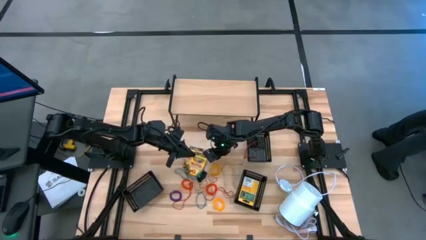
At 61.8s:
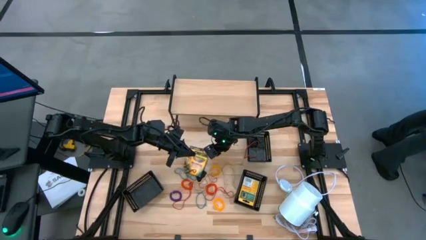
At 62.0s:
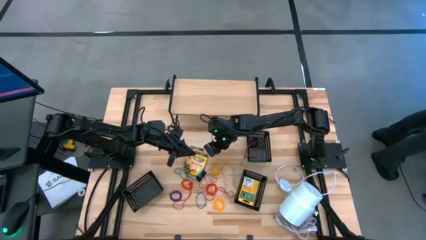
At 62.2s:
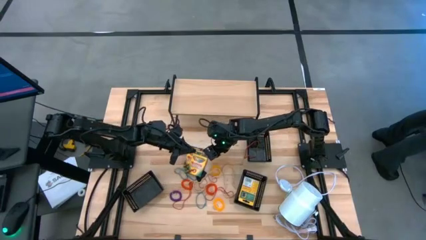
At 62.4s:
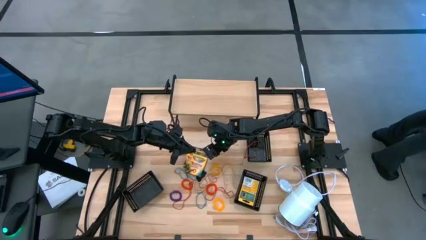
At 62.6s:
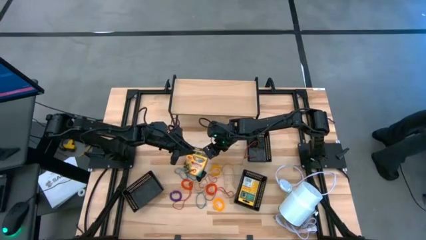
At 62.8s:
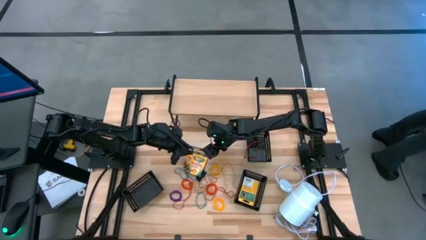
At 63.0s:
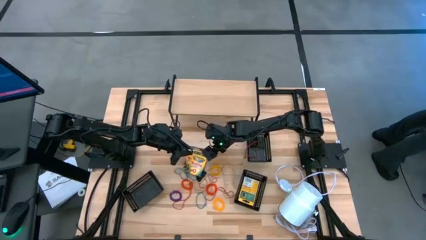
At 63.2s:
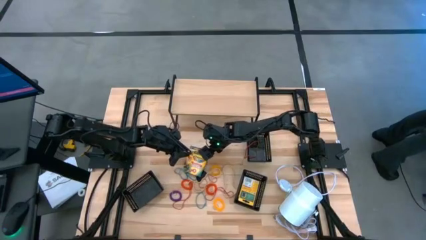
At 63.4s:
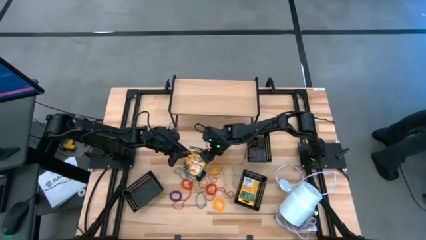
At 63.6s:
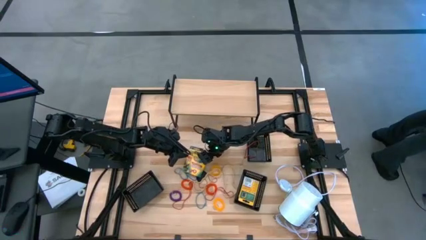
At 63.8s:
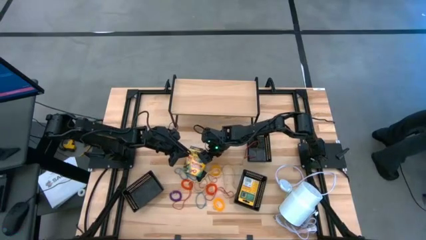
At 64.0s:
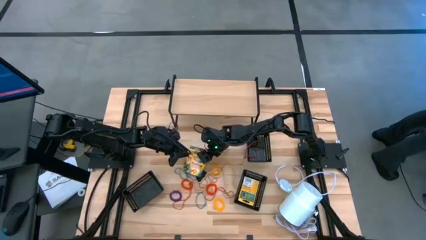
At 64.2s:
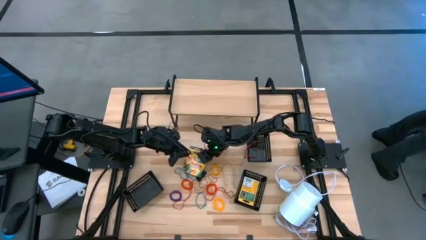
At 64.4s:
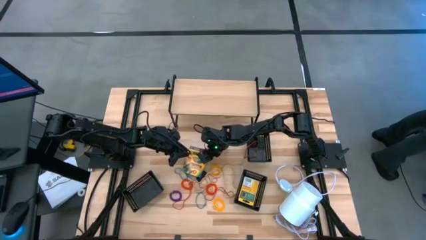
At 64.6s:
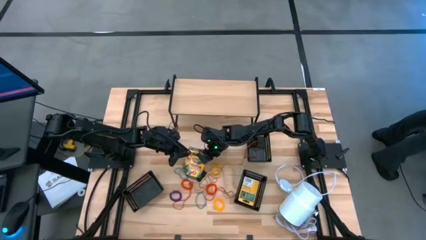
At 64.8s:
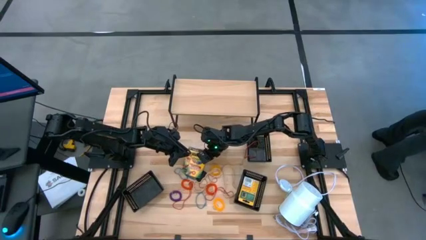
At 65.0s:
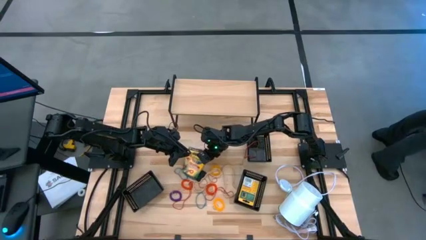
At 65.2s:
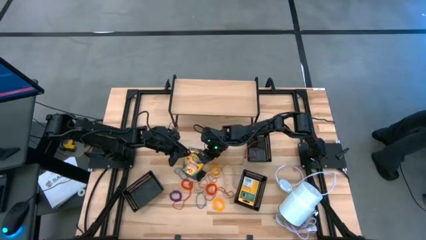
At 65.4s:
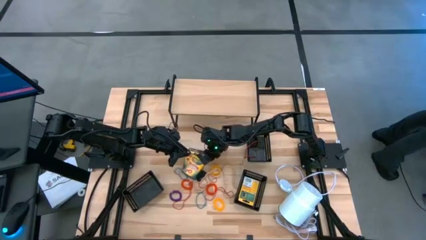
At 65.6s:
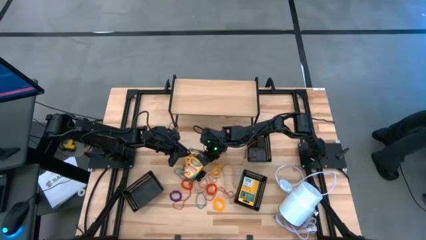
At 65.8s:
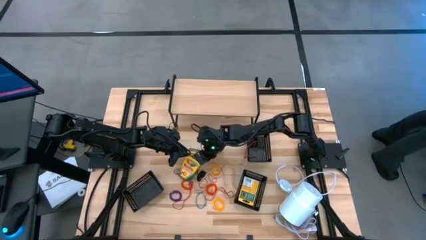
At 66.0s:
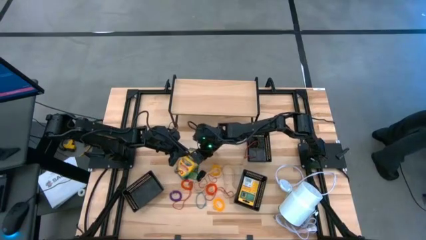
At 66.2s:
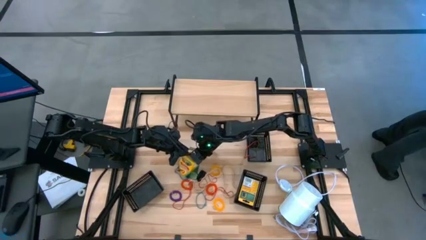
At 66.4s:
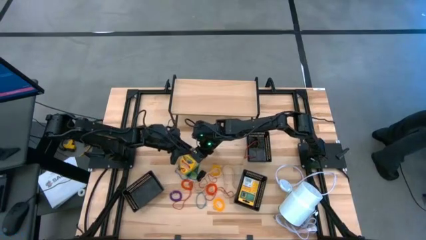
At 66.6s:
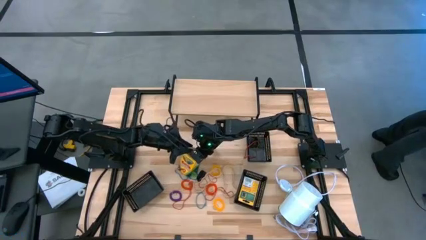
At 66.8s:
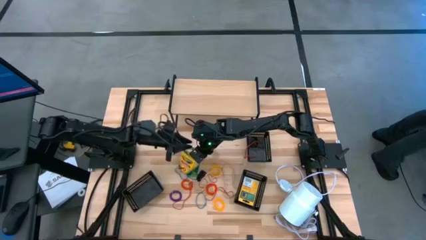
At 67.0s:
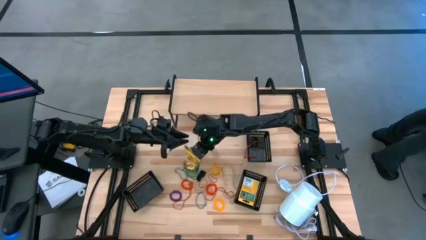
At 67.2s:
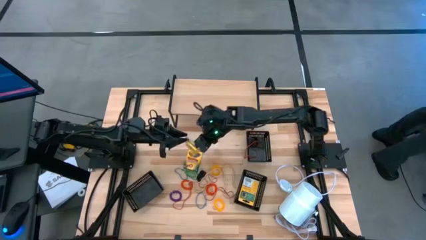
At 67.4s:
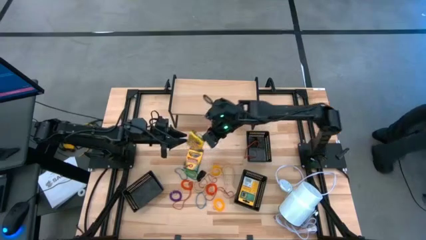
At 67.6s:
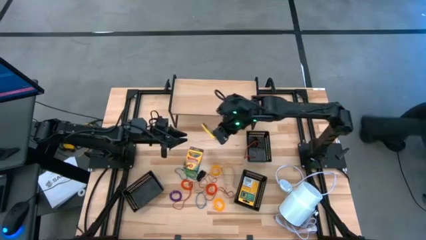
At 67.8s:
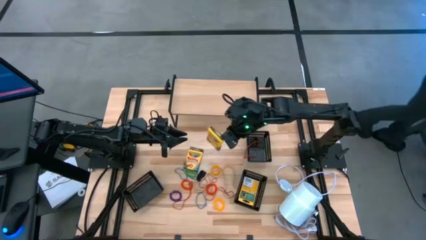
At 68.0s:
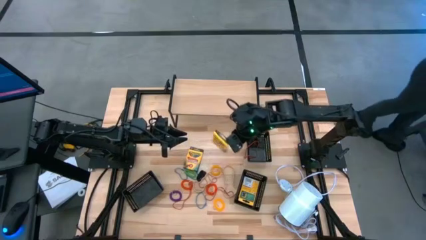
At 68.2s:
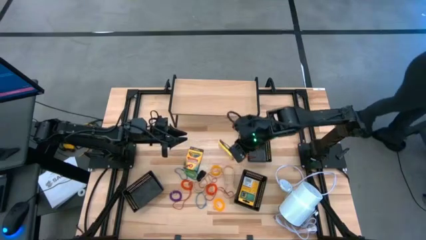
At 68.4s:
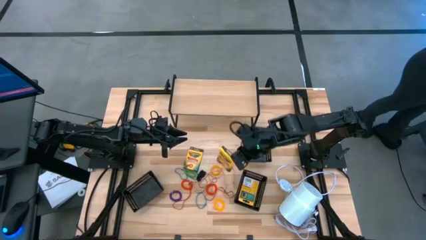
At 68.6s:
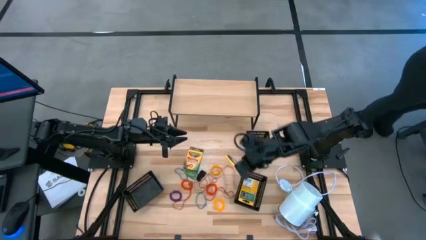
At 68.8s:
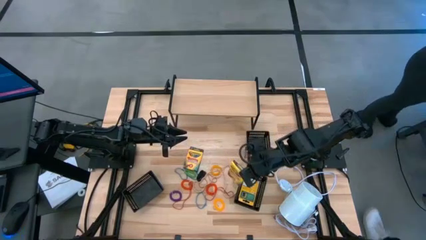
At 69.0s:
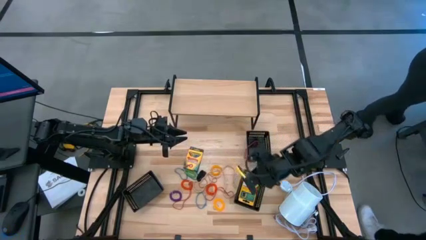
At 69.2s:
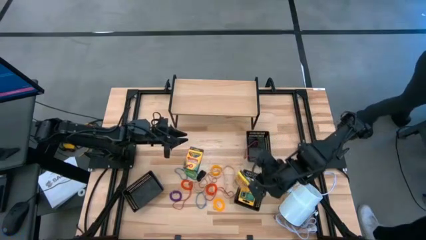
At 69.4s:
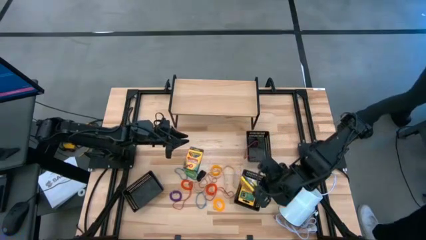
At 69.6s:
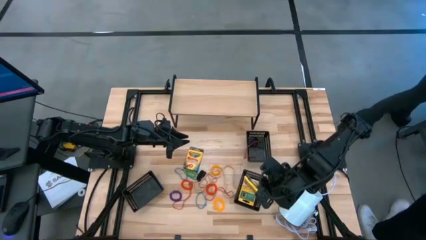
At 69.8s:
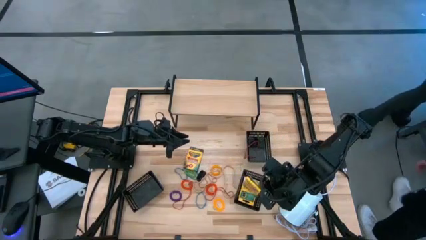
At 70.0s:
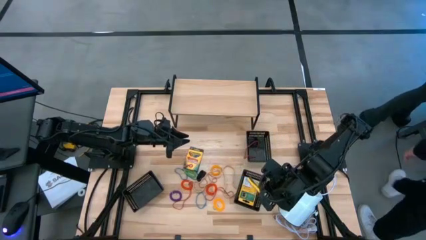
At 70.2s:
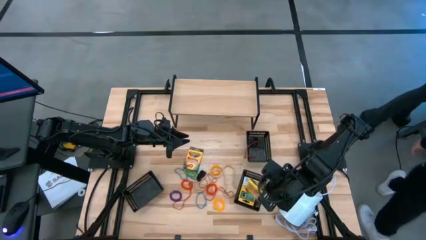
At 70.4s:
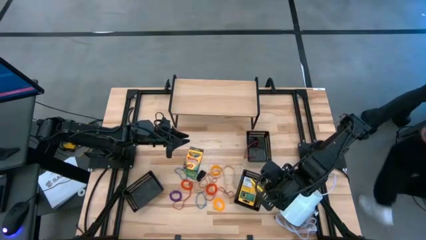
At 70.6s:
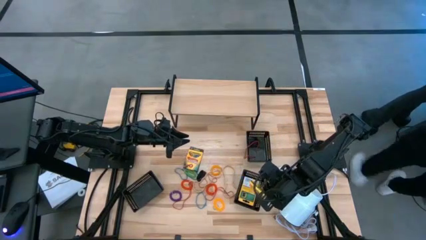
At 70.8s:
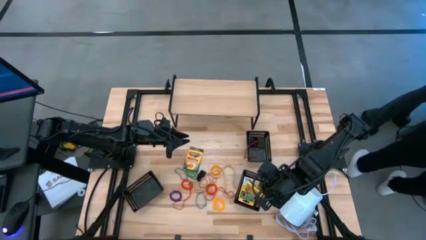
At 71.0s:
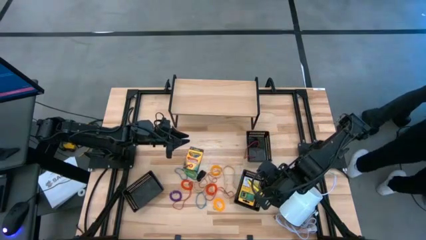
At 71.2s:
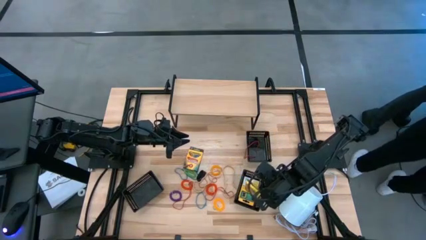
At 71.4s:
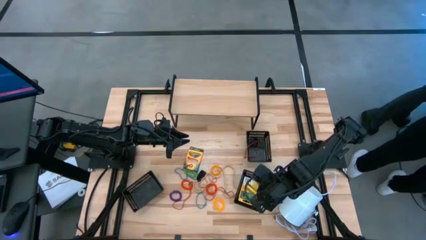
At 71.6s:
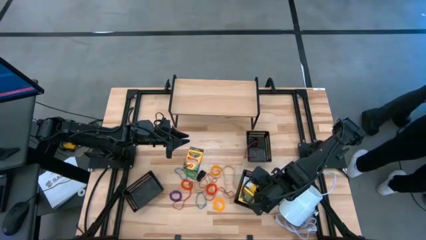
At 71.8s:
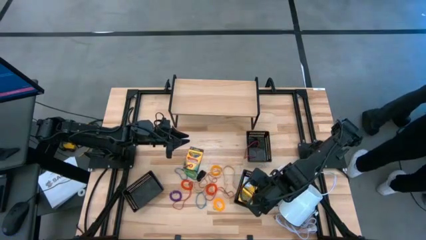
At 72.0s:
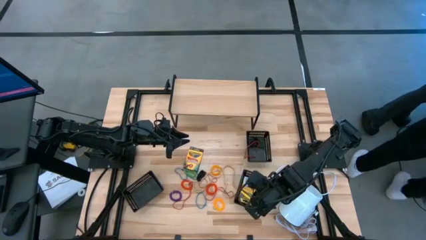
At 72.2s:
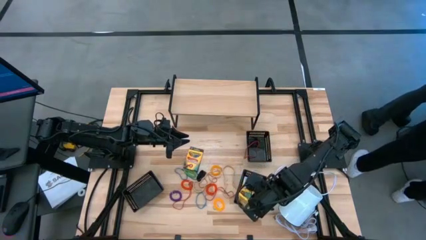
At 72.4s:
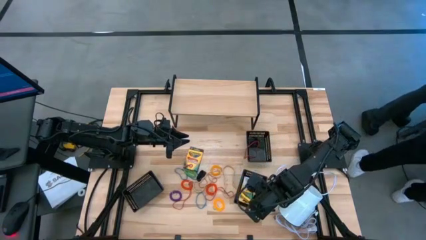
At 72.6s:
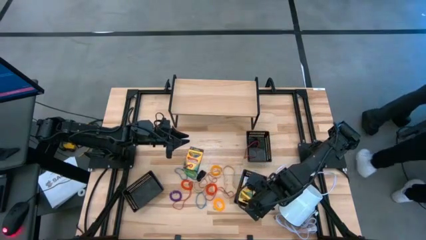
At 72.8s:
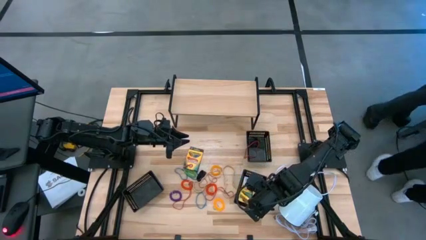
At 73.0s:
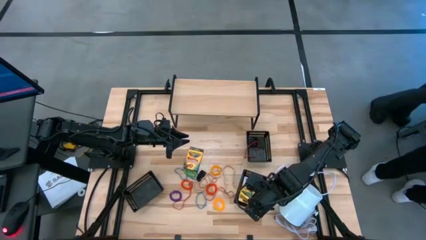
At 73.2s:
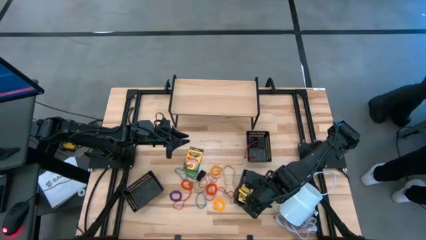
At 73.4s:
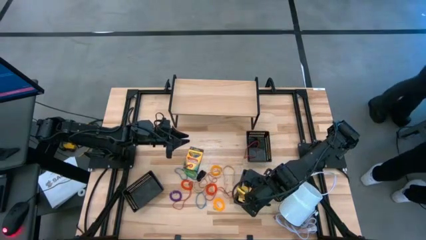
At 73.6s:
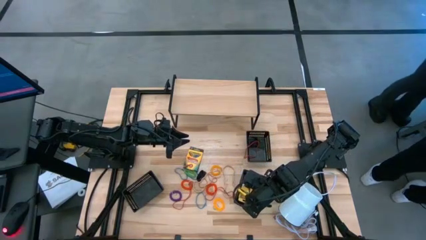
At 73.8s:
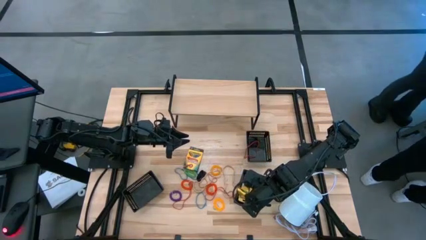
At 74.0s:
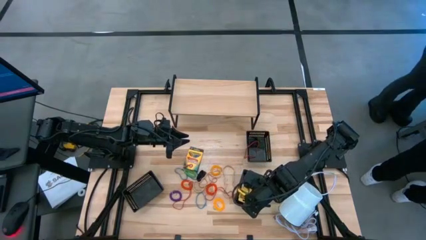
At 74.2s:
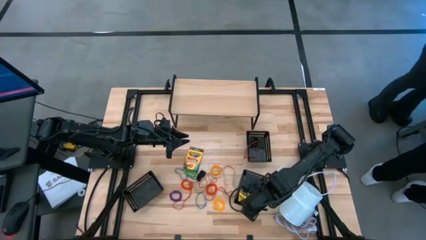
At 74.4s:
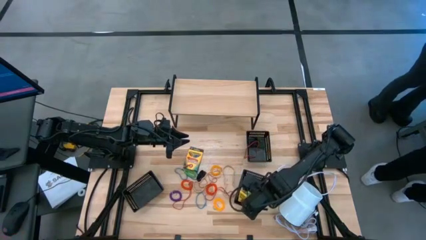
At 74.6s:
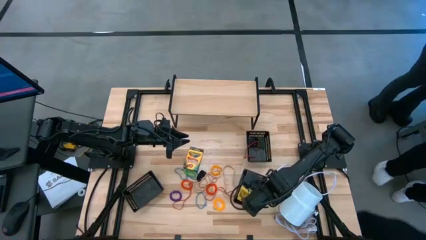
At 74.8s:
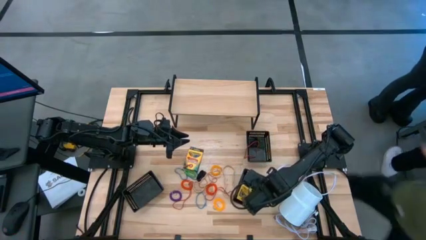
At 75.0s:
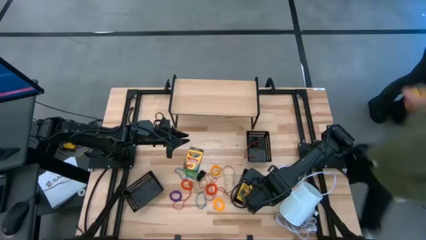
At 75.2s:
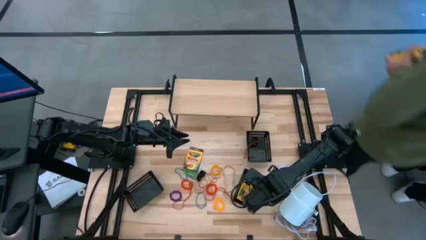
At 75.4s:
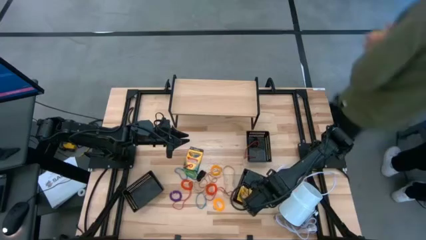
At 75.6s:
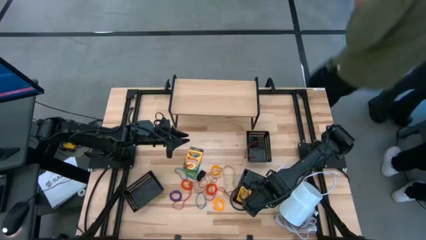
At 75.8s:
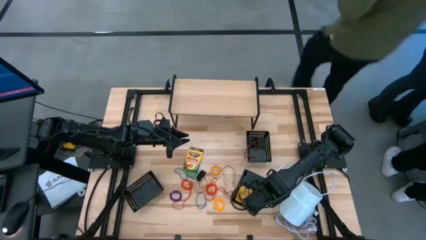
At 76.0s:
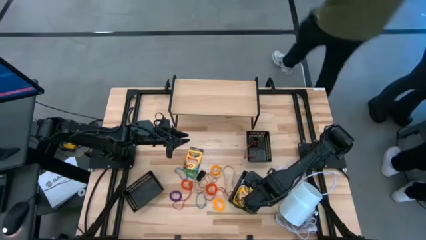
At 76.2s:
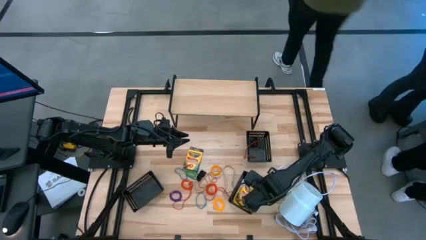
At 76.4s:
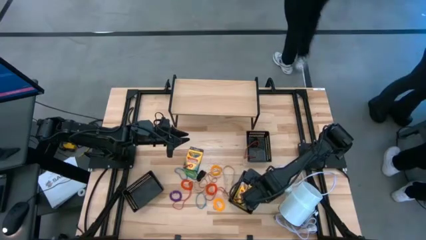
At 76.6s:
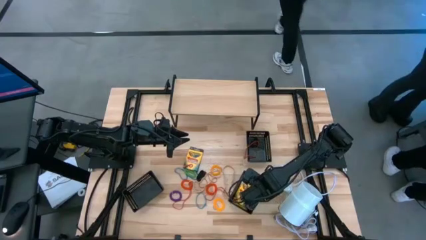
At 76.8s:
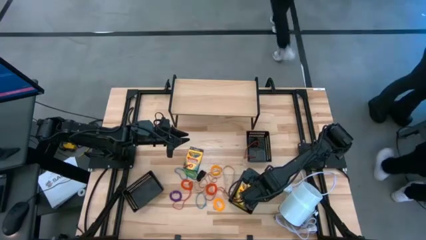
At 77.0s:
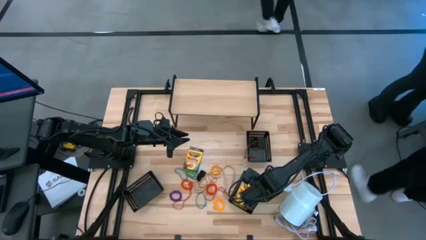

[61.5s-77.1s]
Task: Pick & Place Office Desk Supplies
Put the right crayon box into the bottom right black bin

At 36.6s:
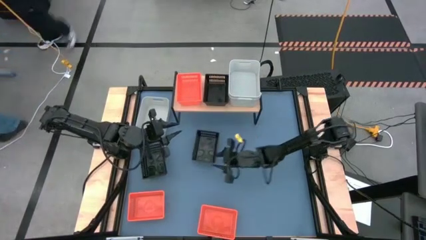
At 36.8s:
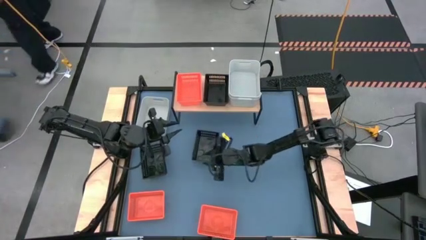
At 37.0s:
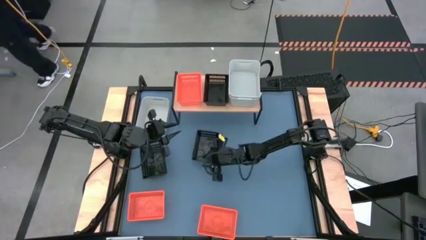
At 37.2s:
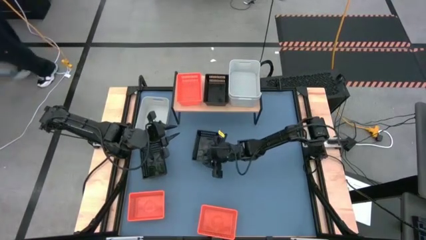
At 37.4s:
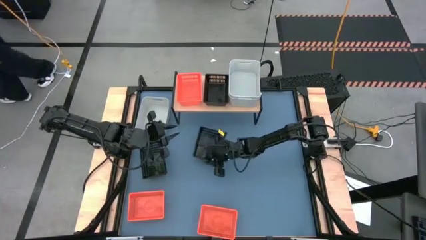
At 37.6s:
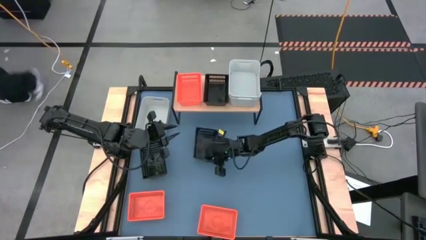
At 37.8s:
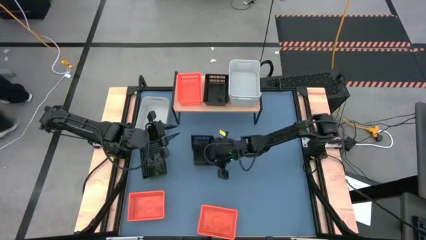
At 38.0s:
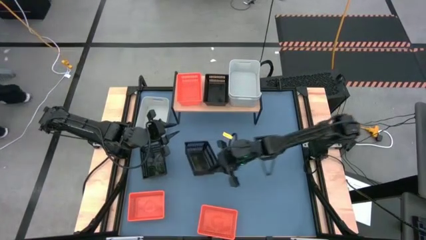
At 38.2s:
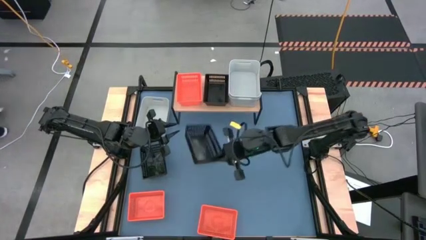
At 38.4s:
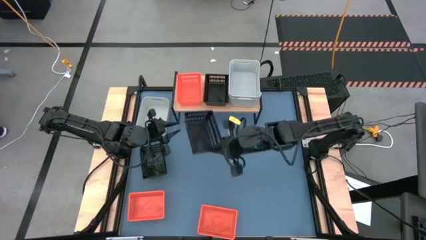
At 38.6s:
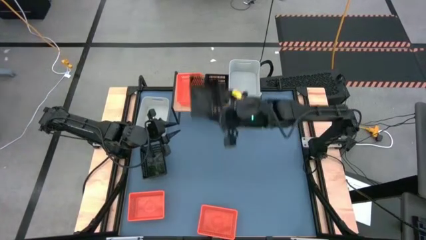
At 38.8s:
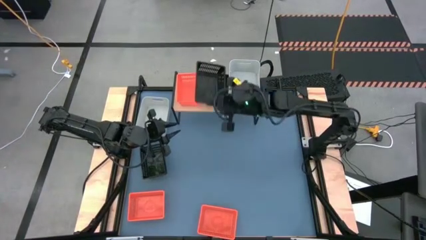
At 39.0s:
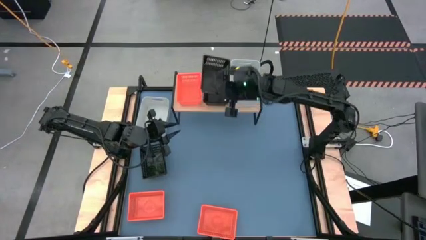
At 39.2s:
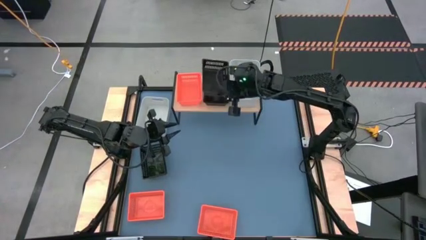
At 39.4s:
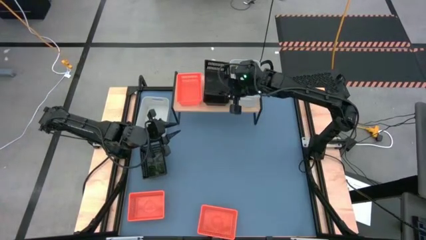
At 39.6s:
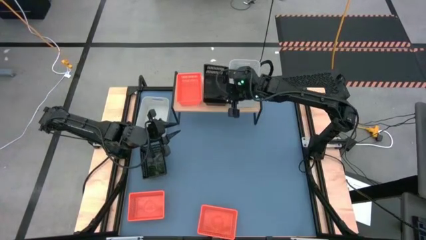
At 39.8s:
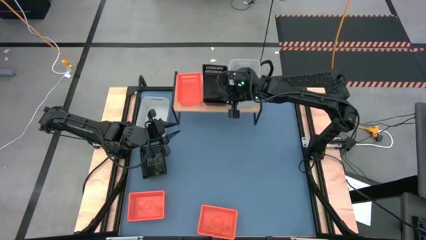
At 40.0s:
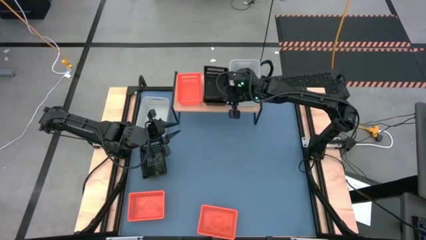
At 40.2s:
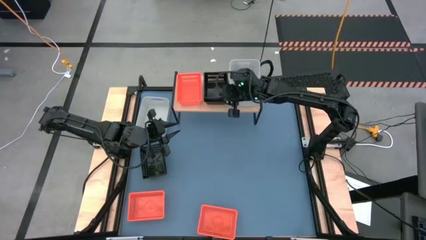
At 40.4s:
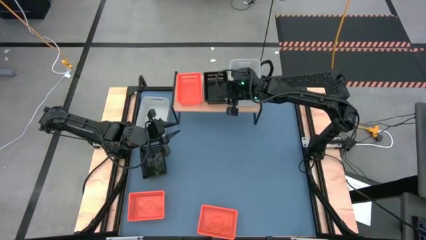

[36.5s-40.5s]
Task: Stack baskets on shelf by color
Stack the right black bin on top of the other black bin on the shelf
